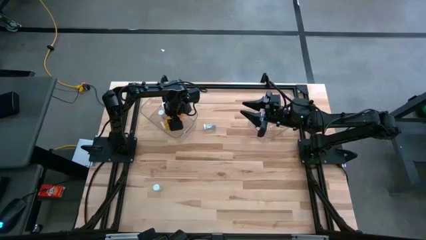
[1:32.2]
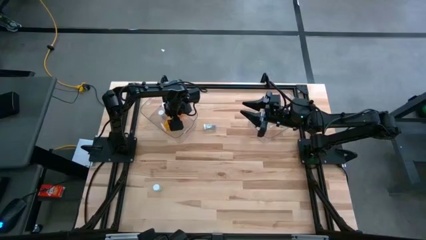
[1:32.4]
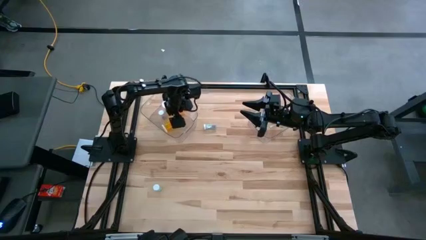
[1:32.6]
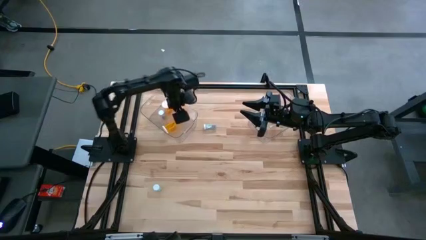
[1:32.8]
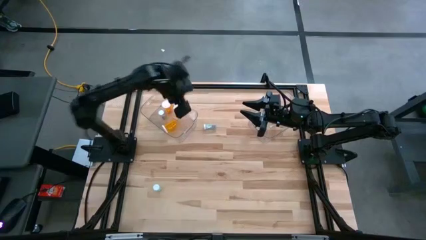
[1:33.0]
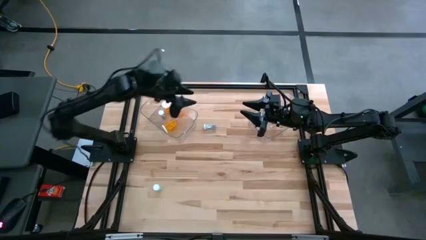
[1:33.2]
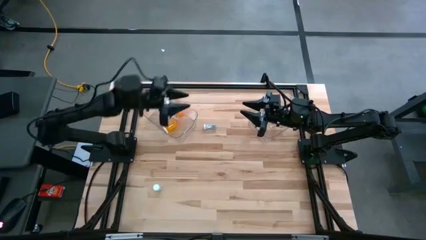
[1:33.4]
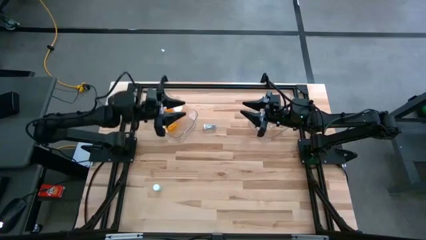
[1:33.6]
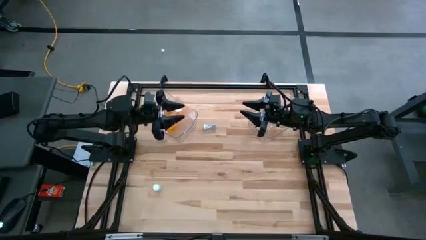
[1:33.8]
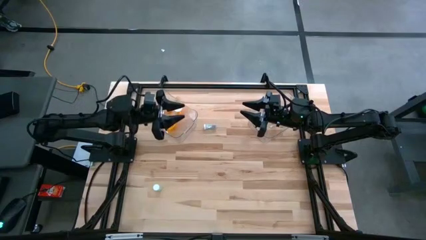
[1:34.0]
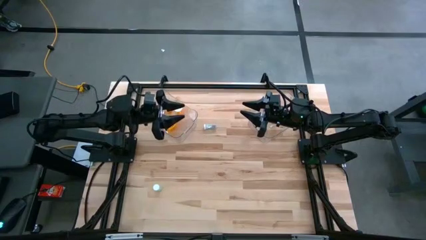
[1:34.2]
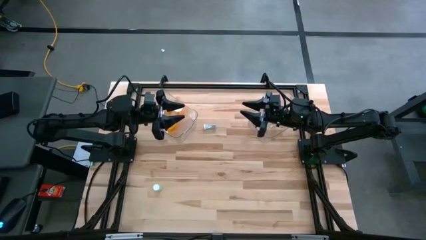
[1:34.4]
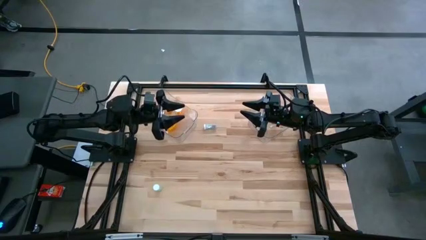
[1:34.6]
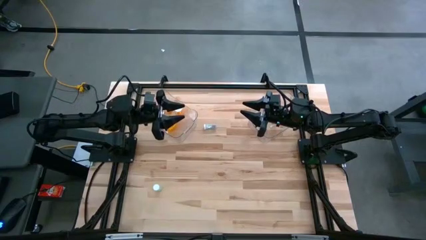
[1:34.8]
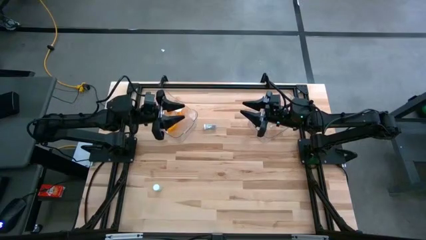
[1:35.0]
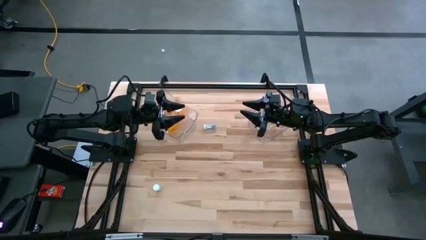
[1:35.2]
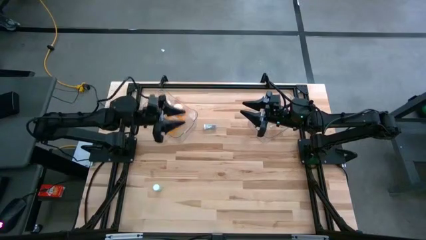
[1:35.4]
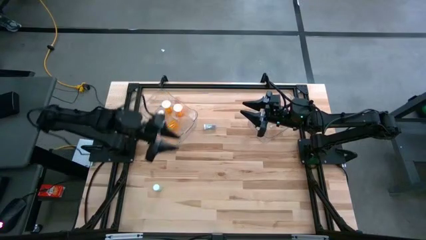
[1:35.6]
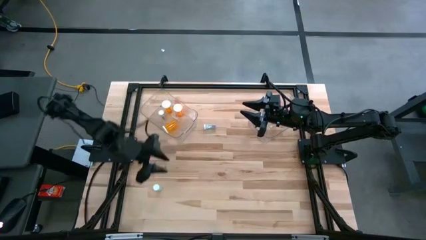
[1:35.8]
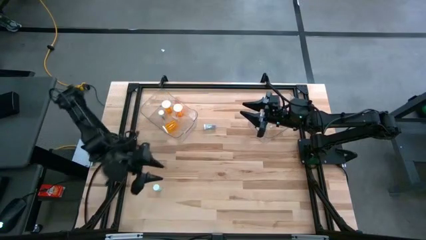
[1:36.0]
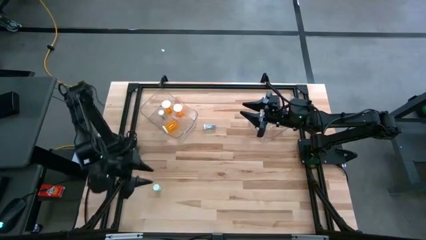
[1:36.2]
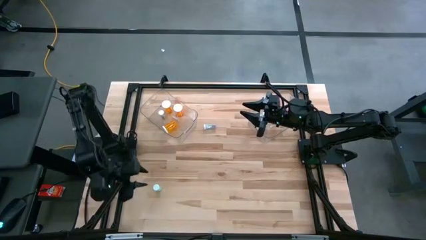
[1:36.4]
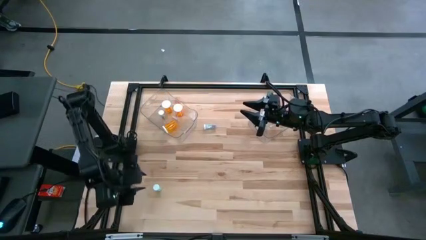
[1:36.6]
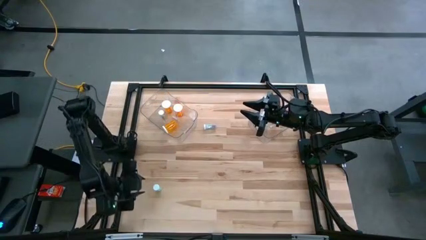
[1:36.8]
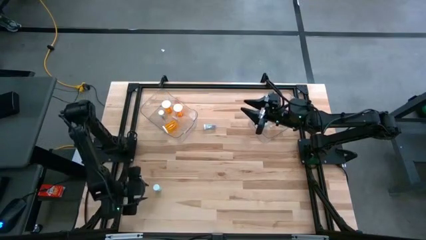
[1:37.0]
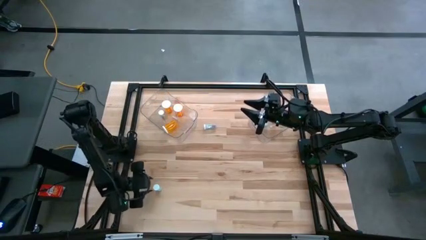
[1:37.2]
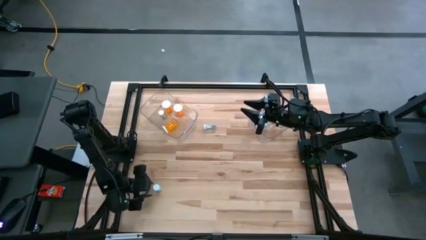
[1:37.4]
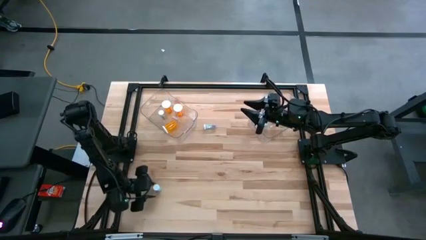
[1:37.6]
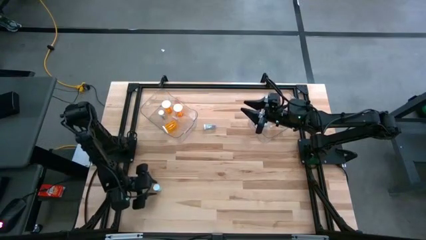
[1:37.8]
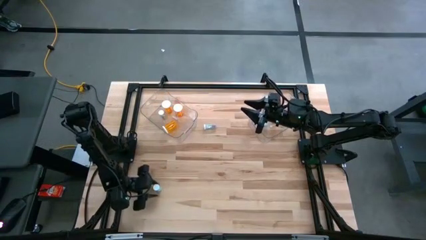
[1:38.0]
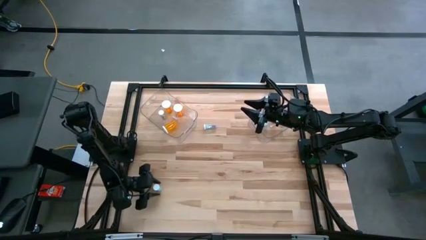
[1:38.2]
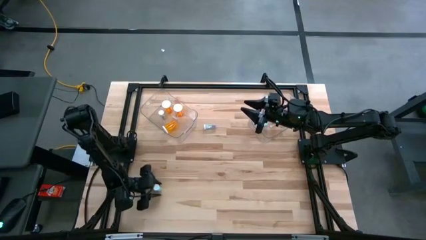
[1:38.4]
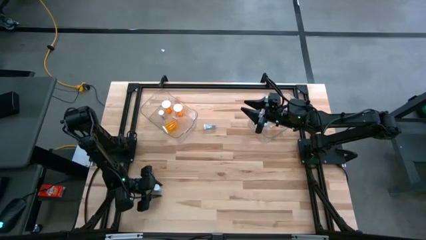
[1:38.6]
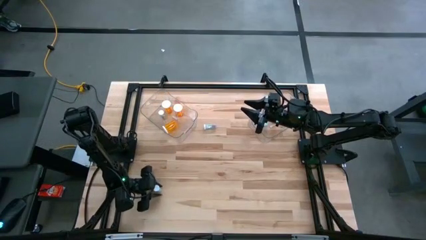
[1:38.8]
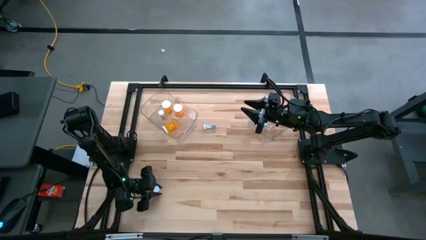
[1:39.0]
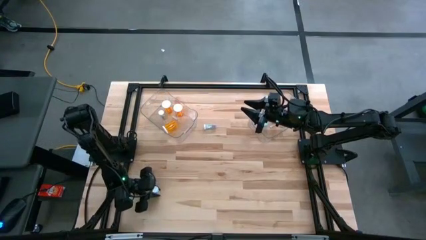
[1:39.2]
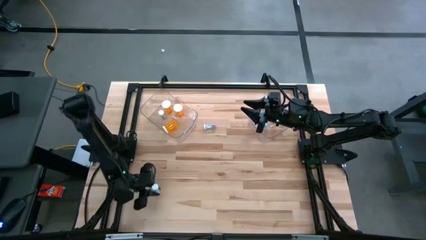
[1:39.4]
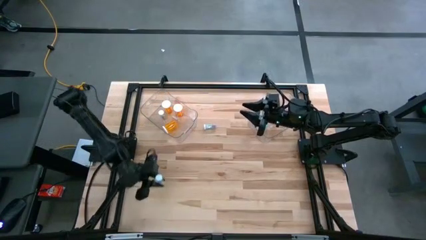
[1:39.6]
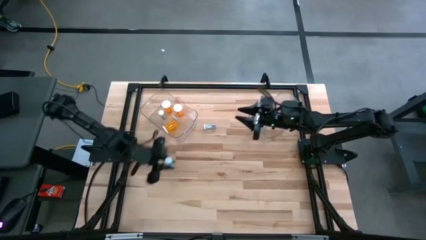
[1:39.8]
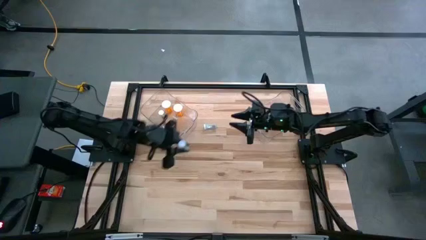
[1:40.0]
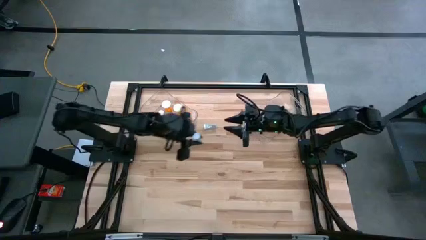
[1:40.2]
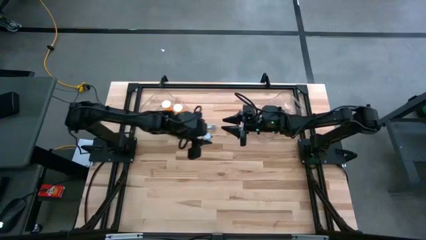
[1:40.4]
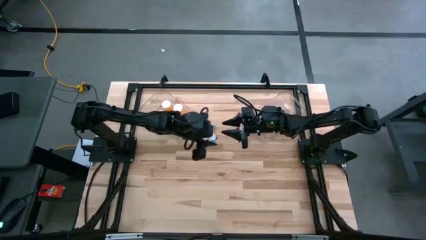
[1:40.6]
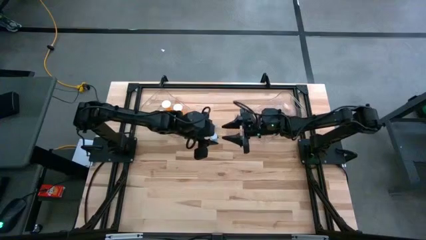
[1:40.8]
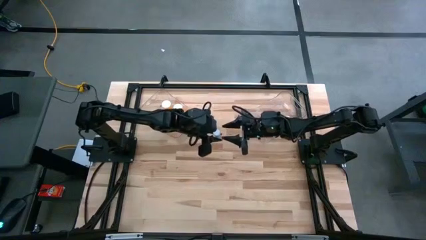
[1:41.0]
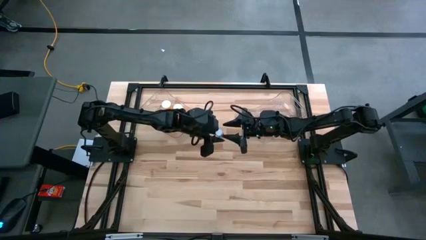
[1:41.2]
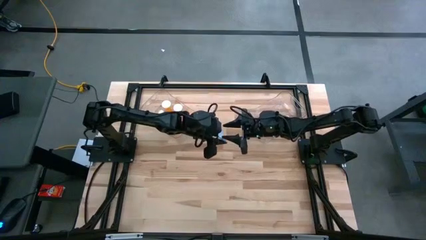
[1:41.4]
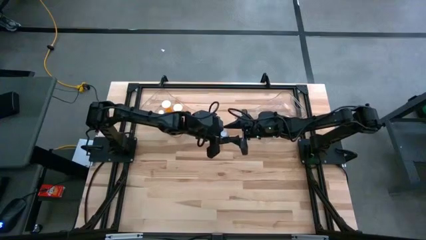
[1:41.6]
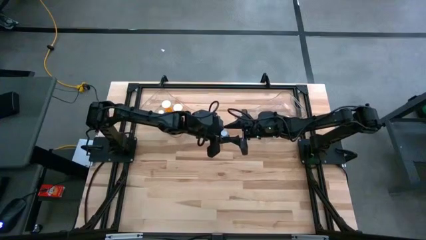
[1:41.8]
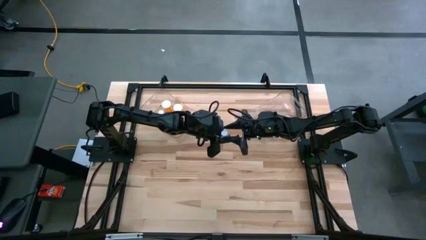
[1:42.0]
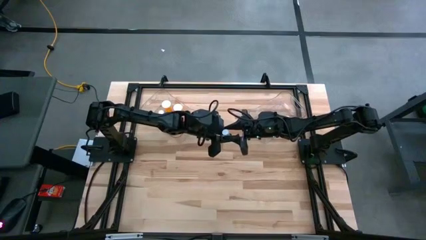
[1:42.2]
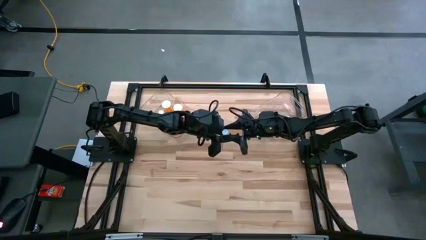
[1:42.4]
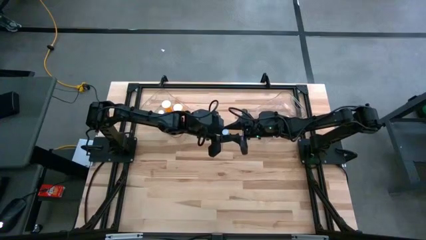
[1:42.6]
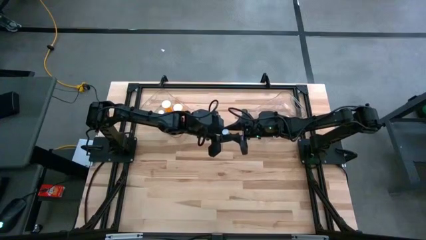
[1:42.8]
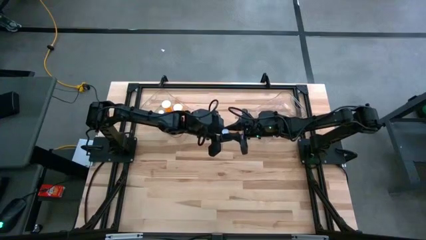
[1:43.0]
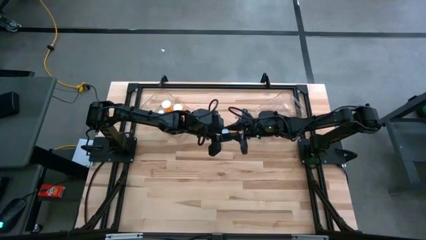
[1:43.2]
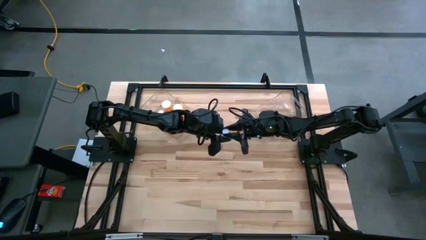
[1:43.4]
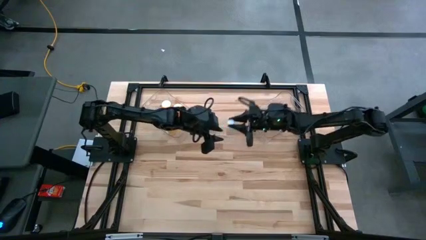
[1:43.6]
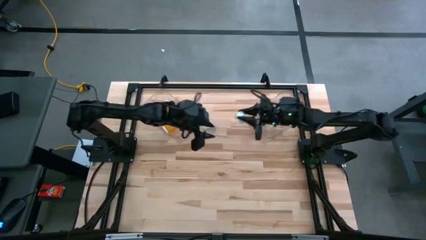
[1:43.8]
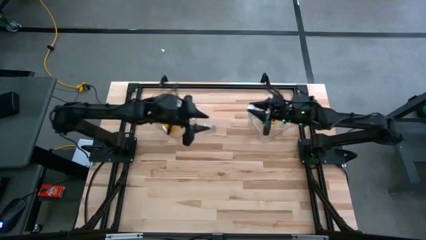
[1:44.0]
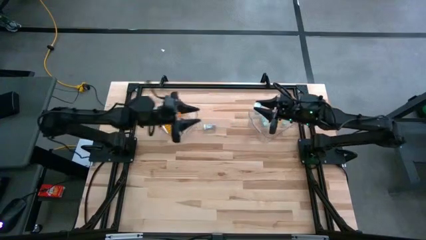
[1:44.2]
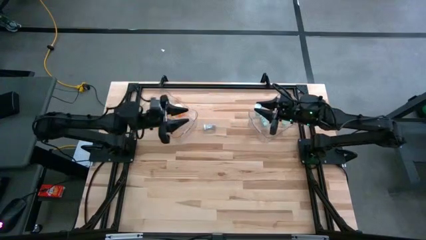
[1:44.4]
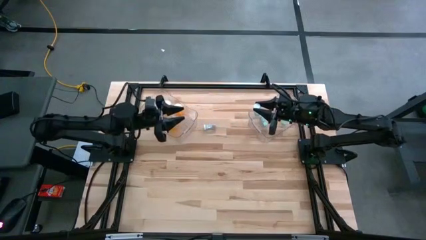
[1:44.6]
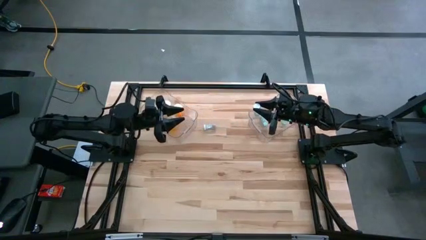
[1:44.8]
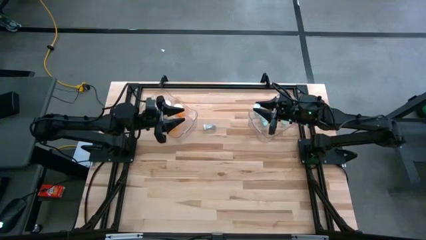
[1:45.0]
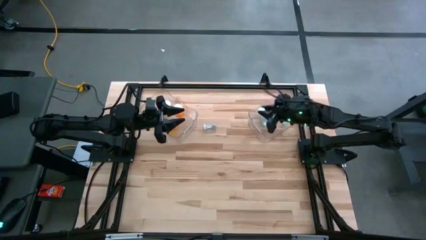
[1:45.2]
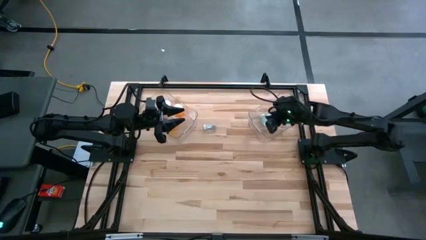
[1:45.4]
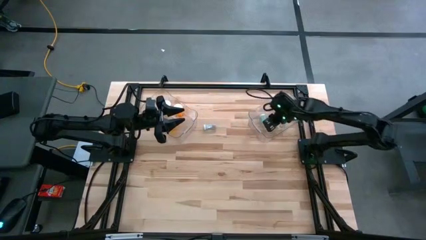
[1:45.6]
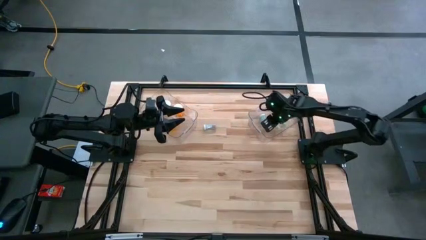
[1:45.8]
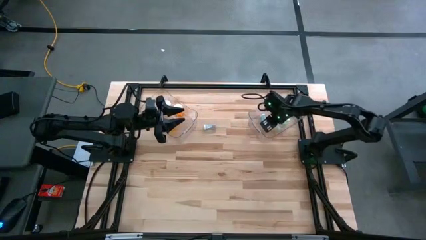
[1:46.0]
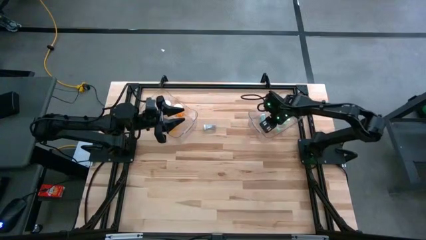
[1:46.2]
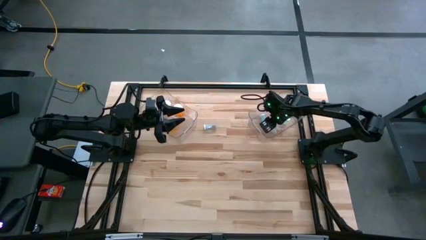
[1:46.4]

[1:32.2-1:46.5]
Task: Pick and place medicine bottles into bin by pill shape (circle, oval)
Put the green tablet bottle into the right transparent bin

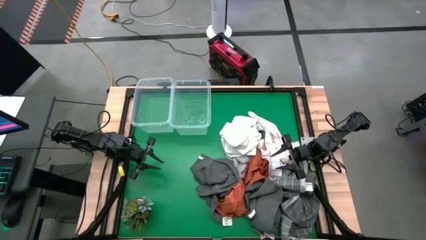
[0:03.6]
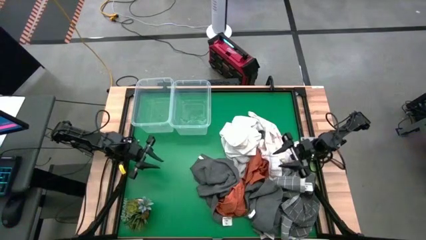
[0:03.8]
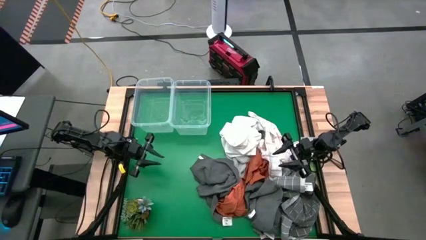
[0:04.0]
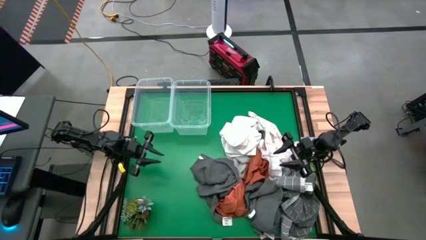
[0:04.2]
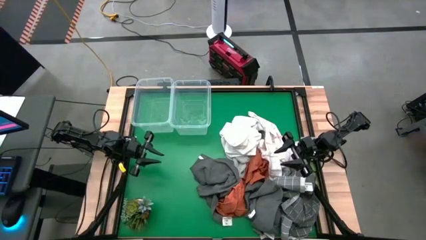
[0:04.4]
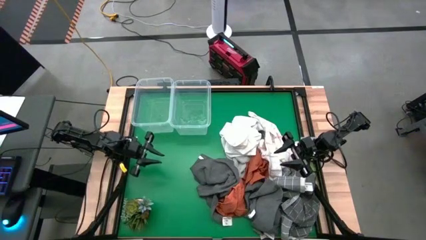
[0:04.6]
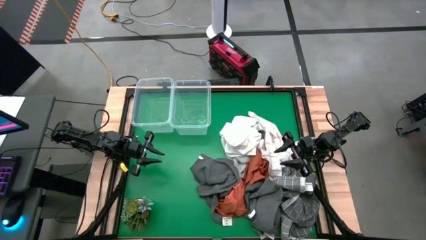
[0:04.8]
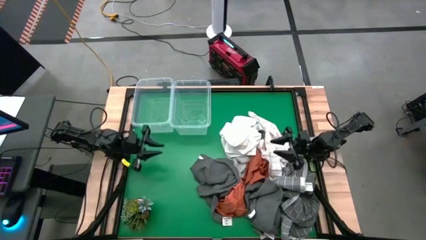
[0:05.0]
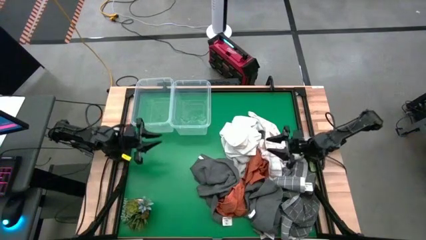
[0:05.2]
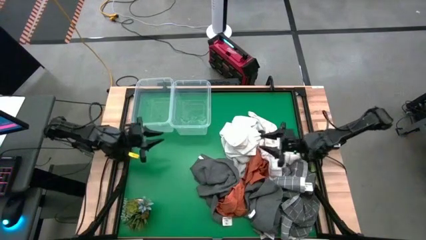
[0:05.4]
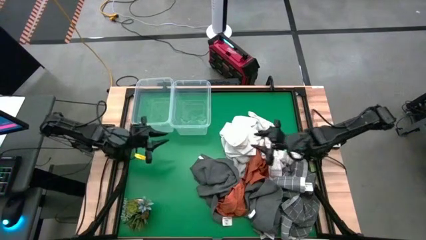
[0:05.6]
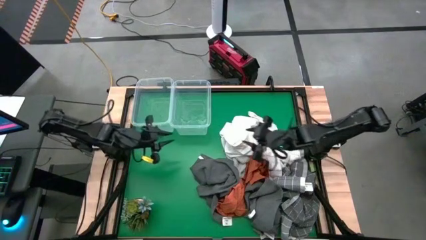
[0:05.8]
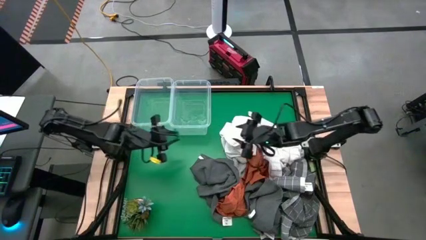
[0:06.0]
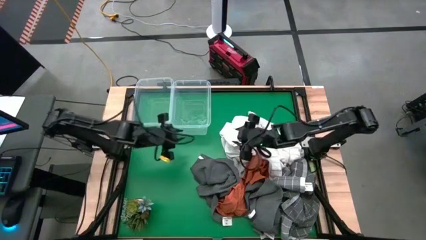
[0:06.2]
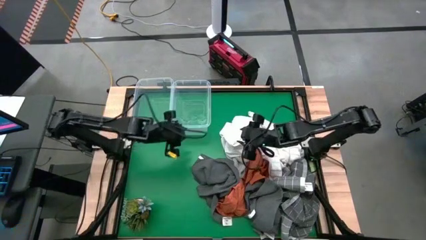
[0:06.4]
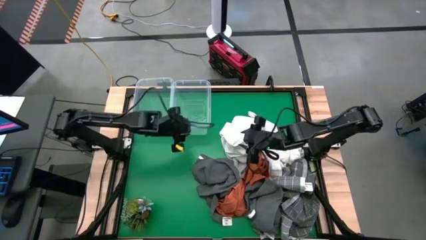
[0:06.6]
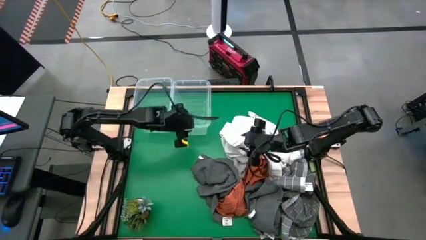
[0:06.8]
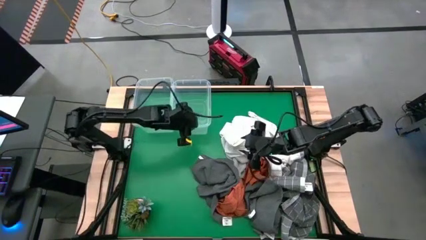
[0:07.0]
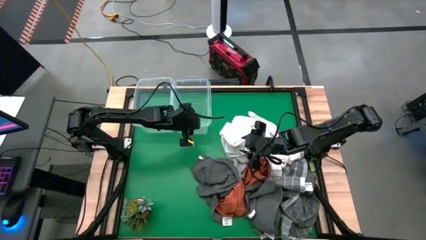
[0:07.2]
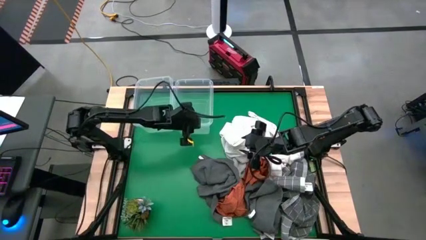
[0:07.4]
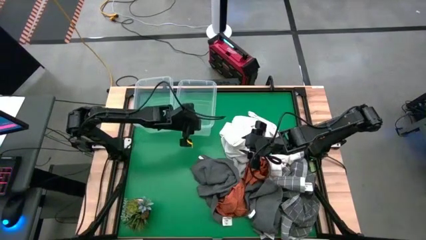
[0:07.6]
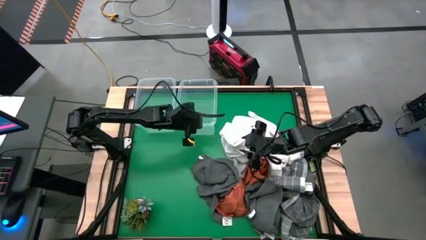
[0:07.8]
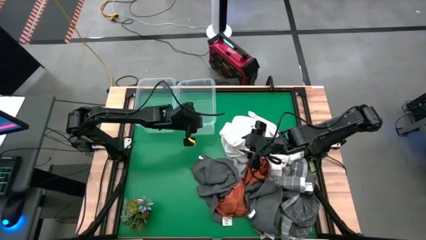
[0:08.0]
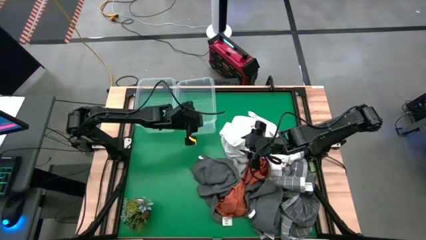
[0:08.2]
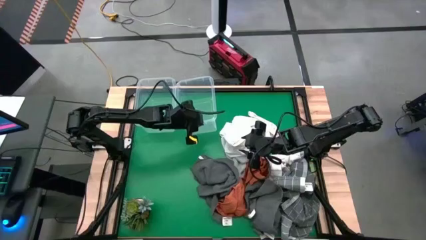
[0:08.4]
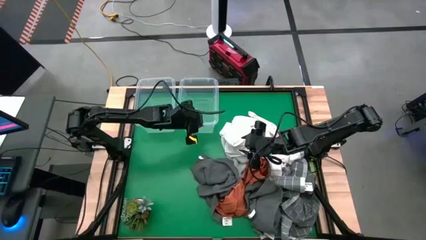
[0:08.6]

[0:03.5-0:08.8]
Task: Sort towels by color in basket
Adjust the right transparent bin
